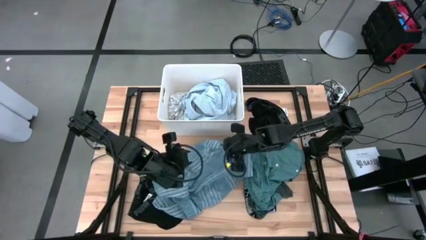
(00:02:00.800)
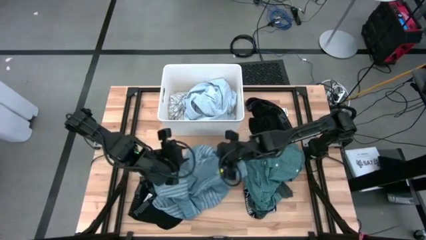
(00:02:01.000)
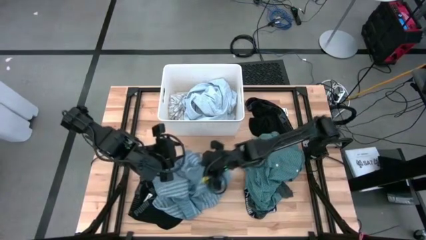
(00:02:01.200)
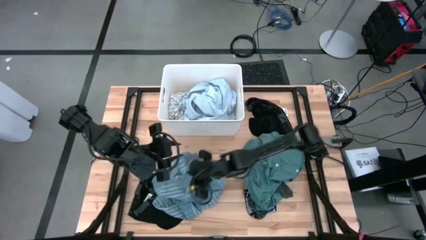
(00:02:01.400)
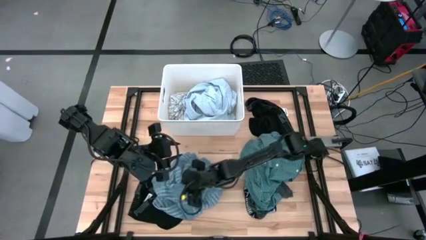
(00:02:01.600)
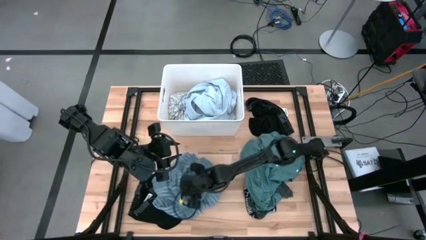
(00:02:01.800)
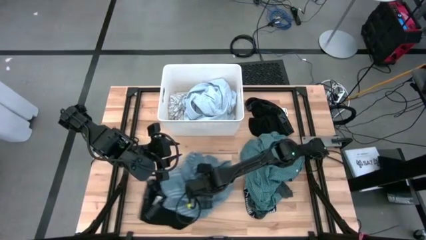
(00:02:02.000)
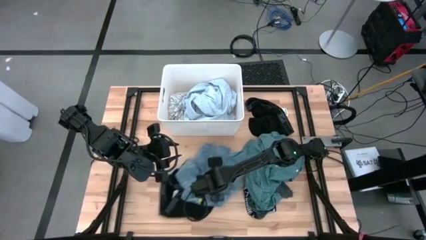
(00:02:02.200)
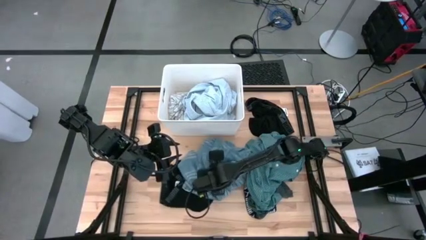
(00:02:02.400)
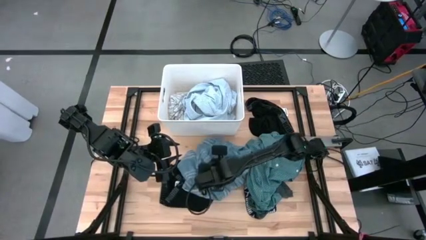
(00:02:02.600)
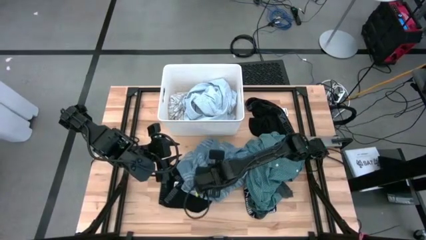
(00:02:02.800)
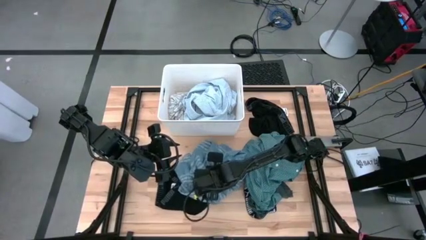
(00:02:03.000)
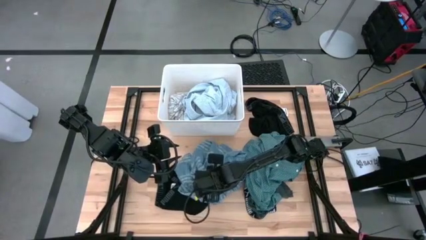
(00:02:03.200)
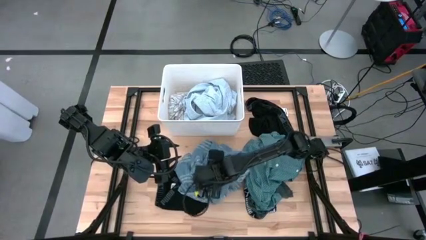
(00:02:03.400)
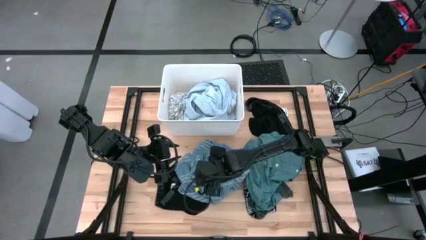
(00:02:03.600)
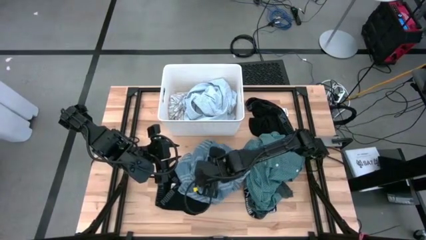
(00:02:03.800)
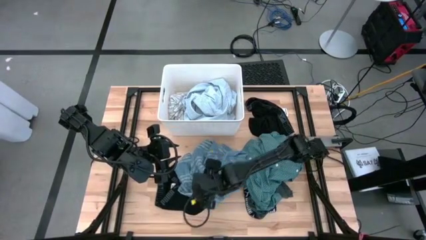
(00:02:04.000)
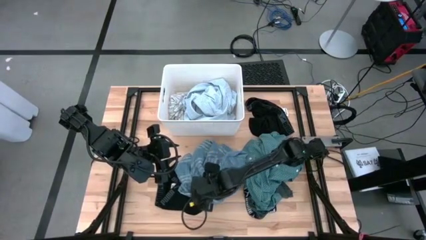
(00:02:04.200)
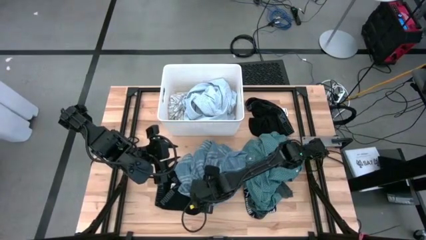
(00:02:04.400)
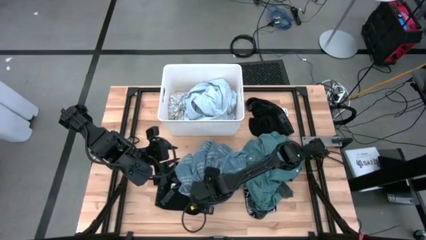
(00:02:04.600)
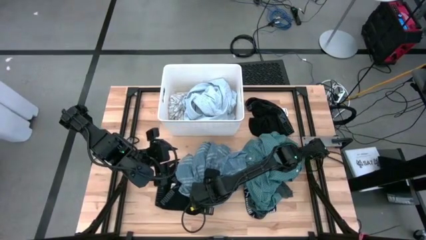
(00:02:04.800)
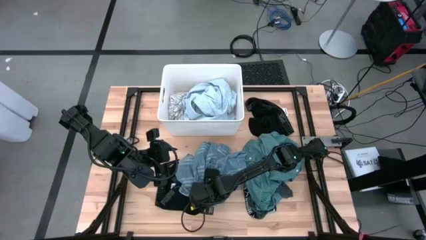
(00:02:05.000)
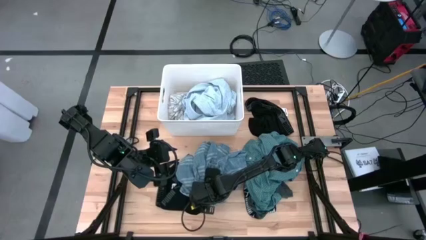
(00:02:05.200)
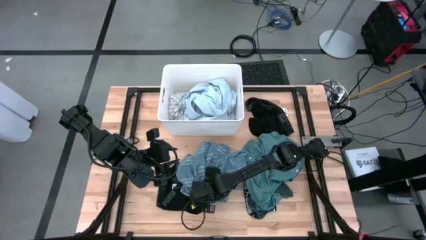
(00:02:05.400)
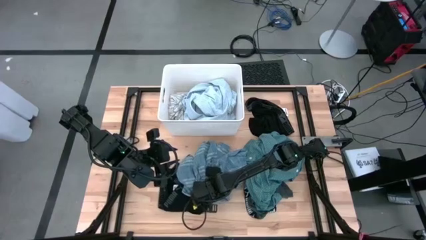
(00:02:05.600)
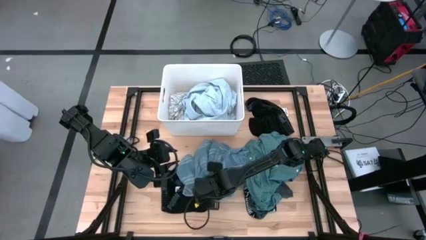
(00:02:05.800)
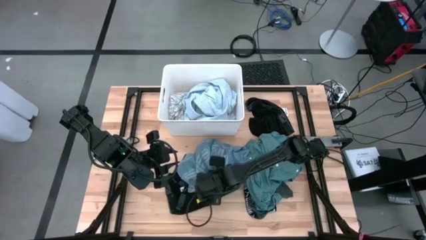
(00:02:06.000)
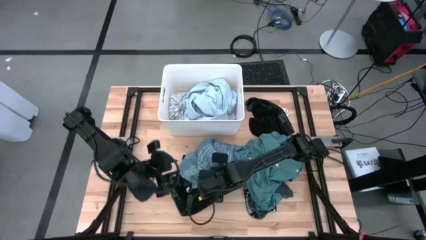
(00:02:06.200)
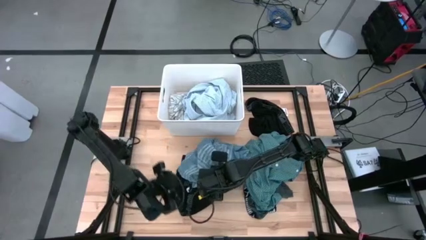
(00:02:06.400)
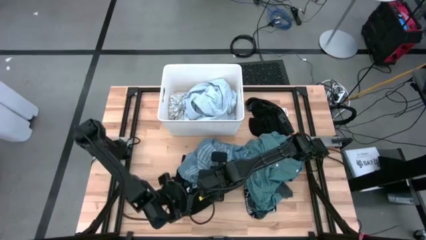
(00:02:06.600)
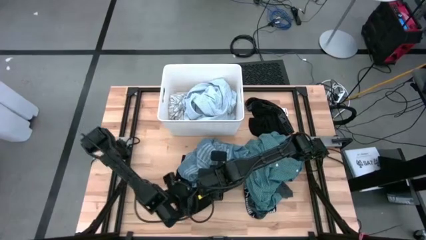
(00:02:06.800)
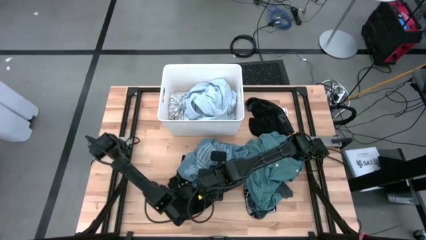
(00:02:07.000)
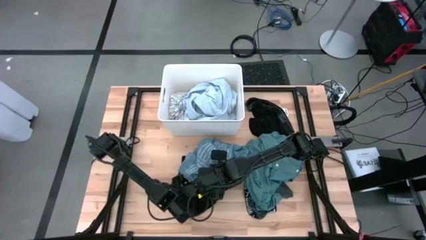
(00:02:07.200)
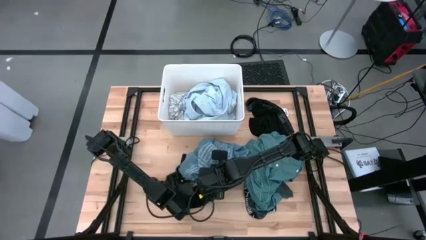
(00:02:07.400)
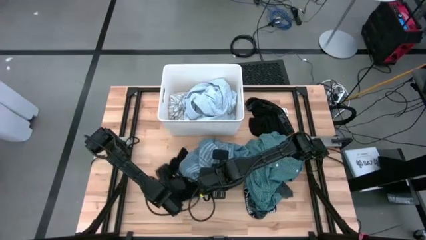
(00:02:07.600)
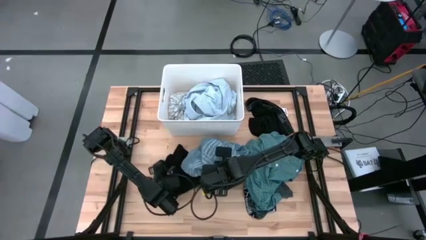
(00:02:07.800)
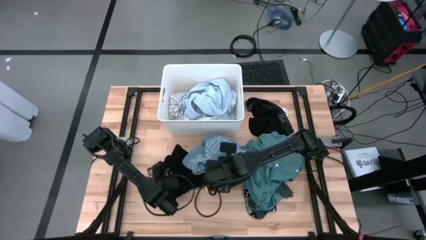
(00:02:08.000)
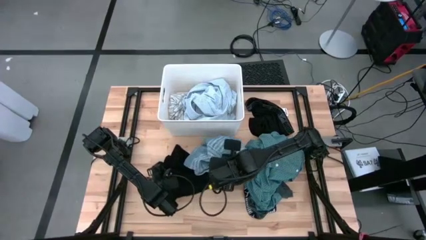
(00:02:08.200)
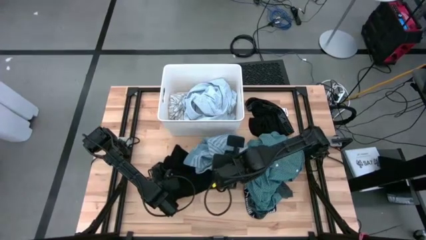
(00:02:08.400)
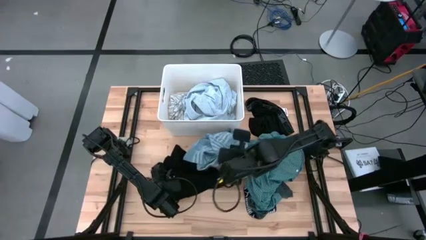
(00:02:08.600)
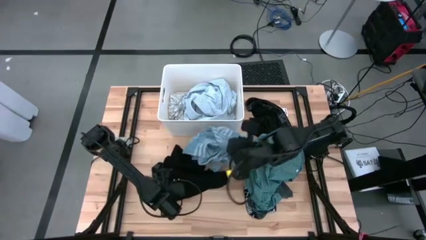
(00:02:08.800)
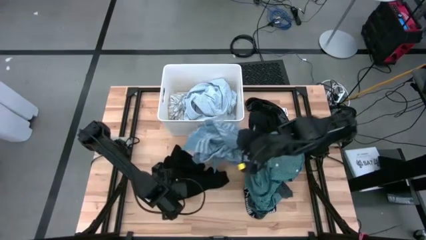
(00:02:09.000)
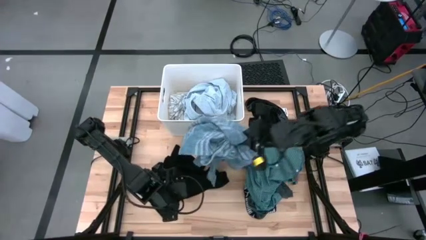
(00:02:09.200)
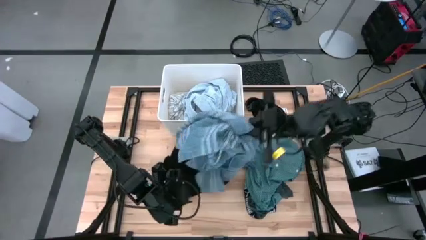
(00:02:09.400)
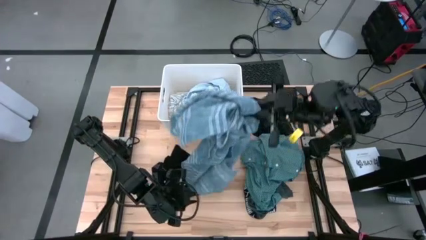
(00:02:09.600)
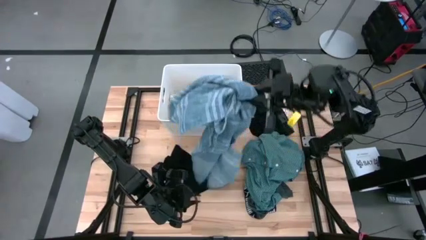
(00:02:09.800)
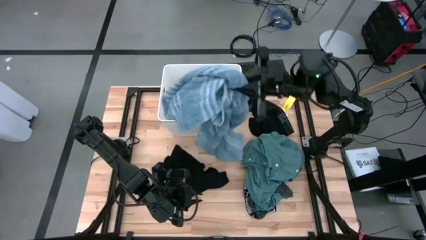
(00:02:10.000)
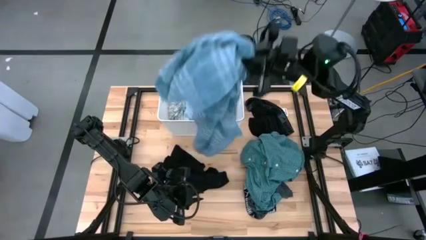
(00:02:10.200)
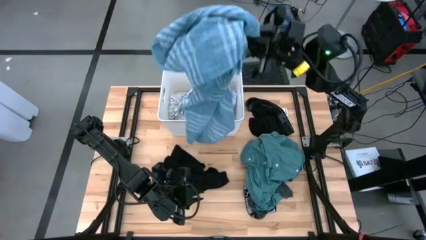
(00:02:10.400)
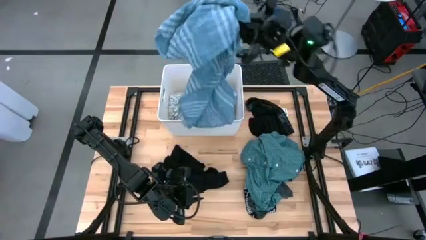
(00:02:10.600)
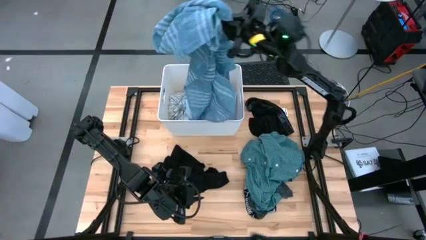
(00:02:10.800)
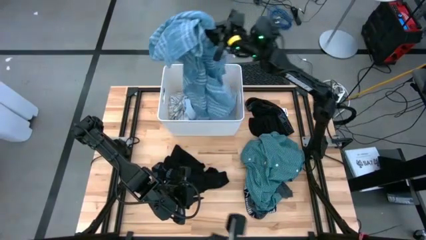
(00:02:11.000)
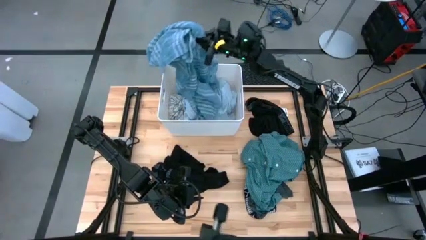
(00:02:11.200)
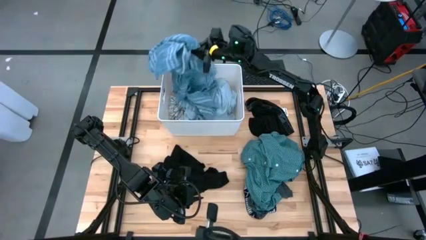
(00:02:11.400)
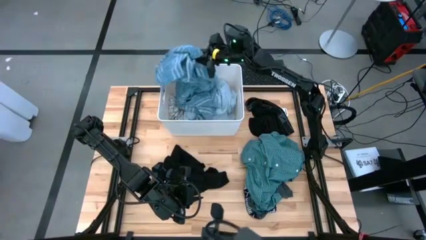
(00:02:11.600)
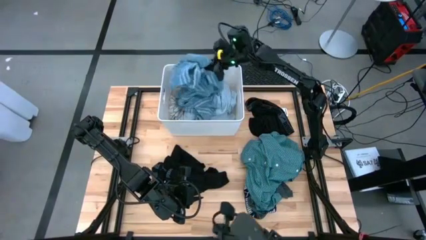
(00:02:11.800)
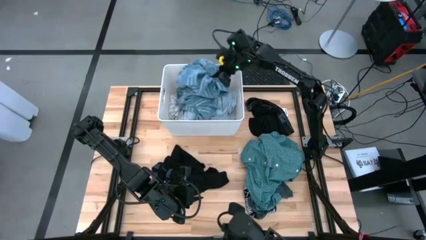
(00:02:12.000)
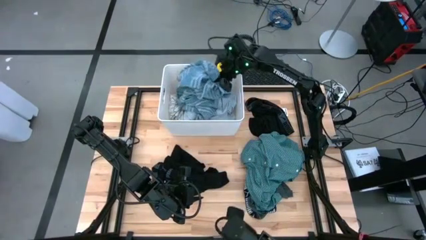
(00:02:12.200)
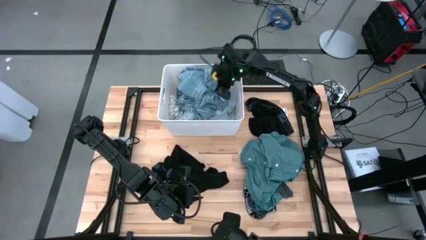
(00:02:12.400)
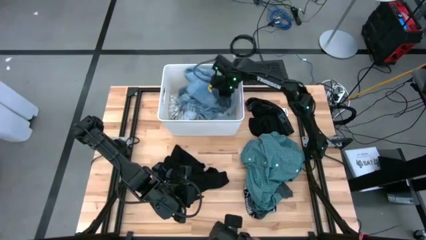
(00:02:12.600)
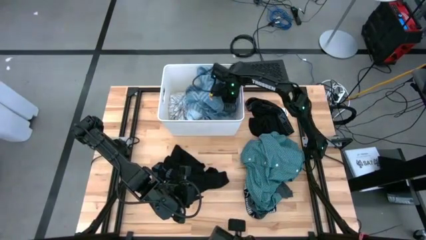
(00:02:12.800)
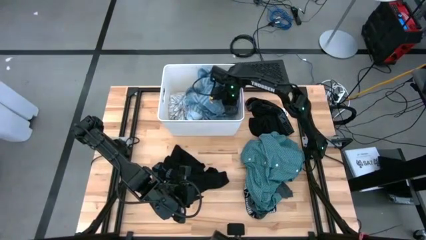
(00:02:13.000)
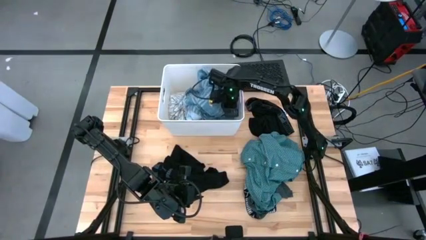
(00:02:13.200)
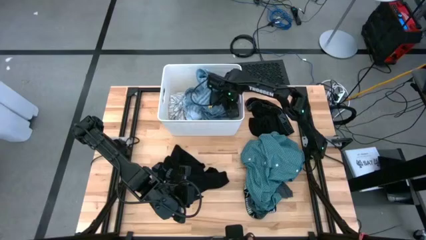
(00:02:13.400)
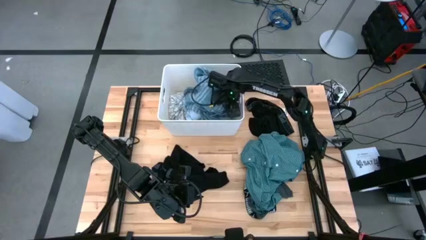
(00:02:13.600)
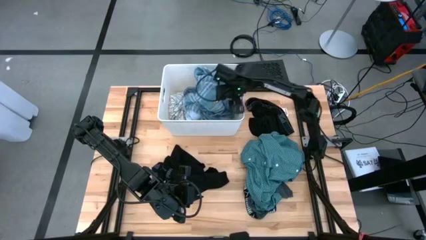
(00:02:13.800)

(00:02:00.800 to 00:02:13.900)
Task: Sort clothes
Put the blue striped shirt into the white bin
